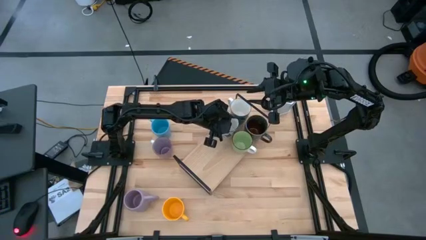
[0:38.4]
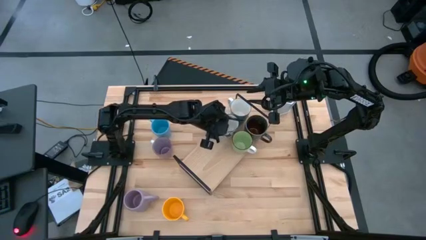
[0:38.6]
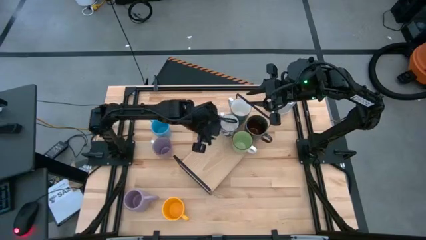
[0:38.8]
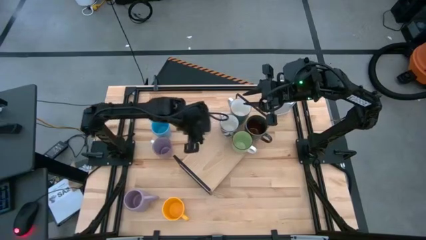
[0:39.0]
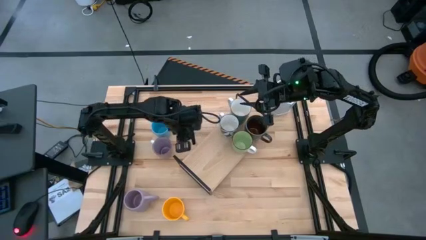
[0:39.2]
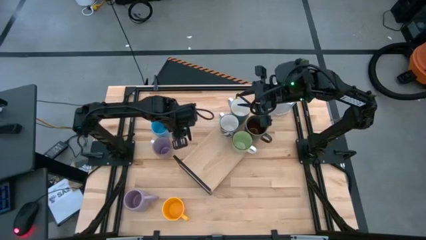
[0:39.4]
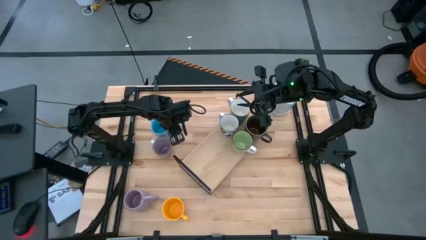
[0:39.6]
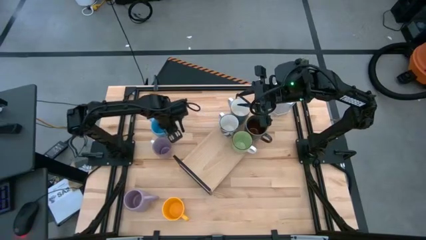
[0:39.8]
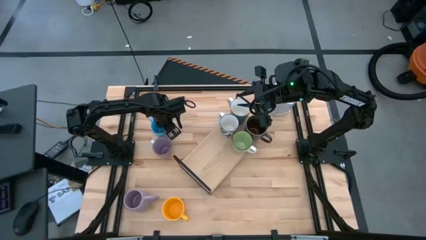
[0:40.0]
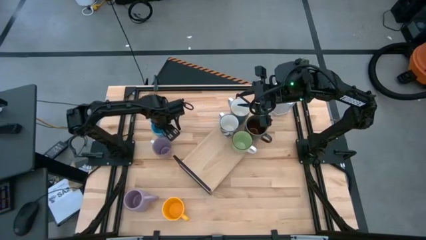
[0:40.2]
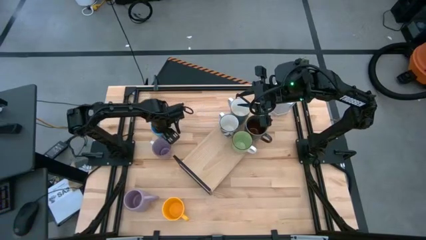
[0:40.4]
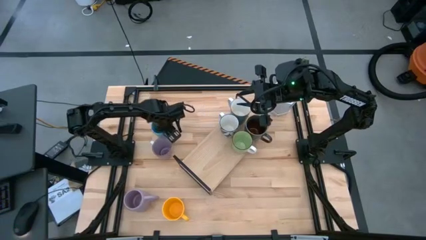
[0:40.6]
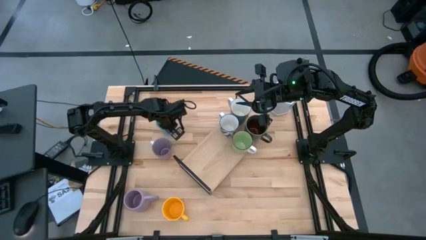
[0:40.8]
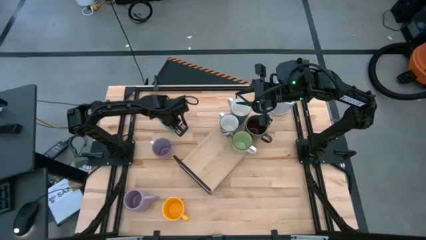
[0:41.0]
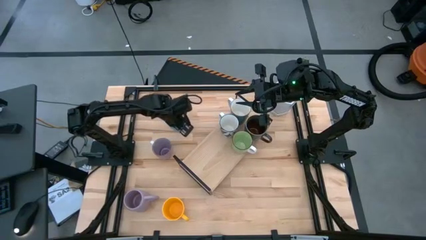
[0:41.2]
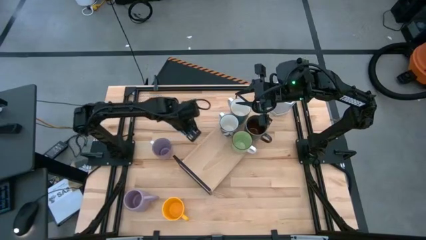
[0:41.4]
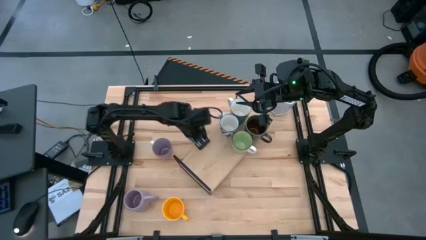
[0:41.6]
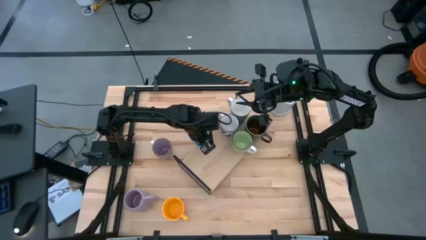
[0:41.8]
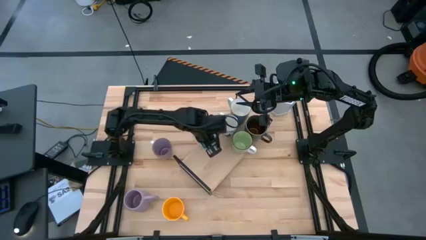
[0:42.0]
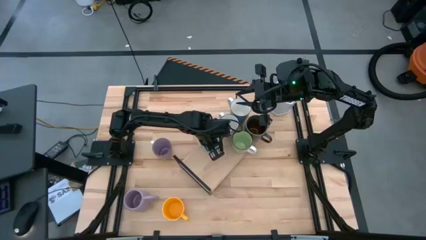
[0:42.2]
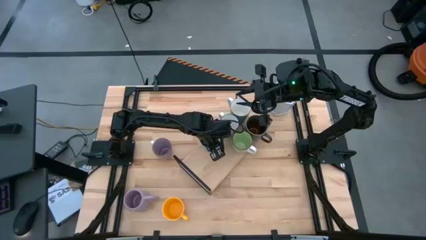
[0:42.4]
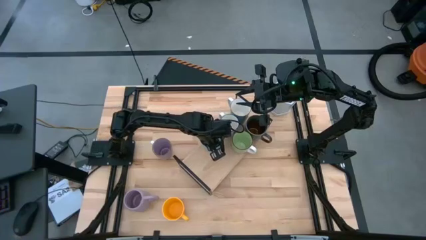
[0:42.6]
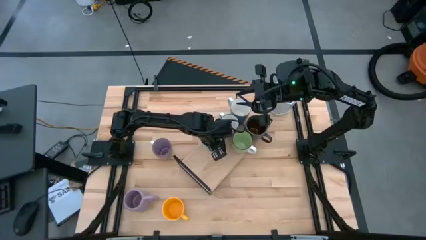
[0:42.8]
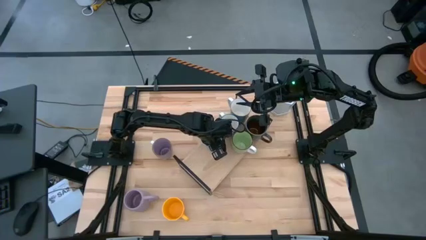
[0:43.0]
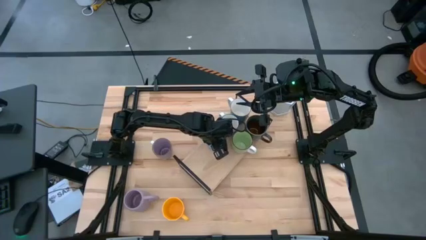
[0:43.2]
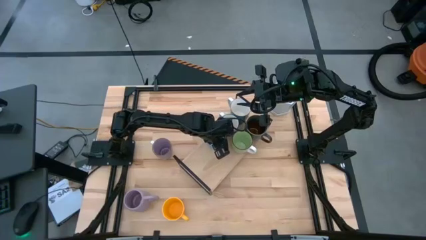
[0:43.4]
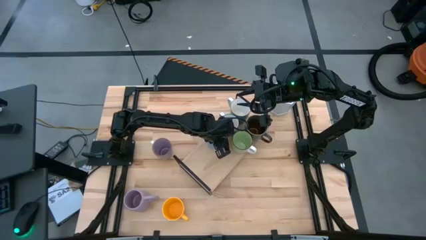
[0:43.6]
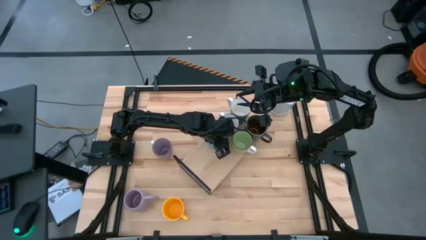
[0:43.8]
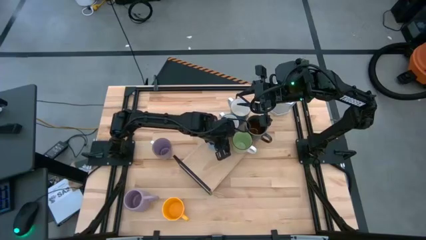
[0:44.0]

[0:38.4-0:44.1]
Task: Place coffee mugs
Put the blue mug on the shelf

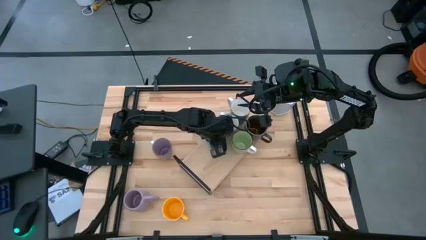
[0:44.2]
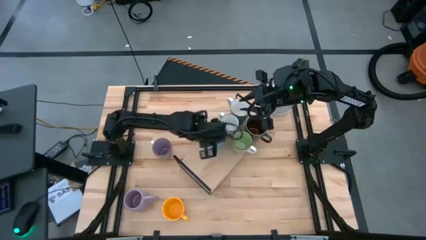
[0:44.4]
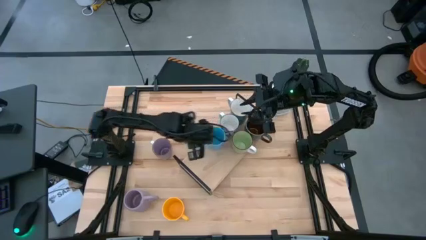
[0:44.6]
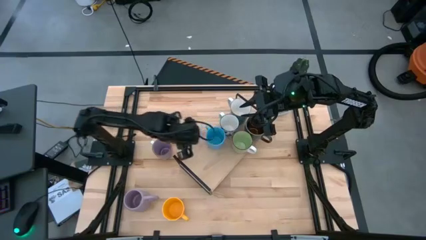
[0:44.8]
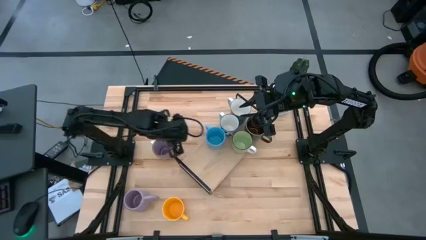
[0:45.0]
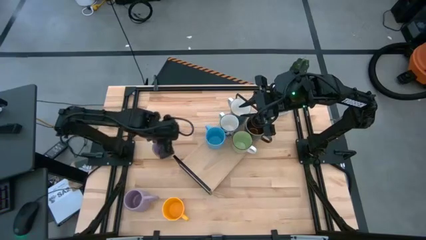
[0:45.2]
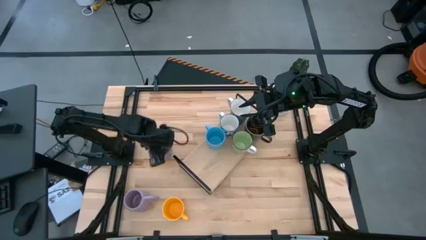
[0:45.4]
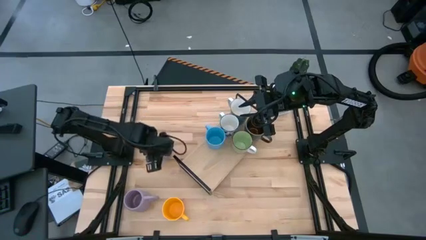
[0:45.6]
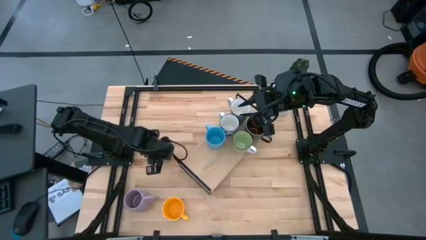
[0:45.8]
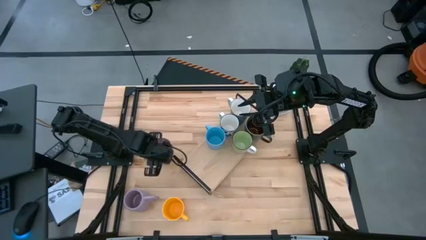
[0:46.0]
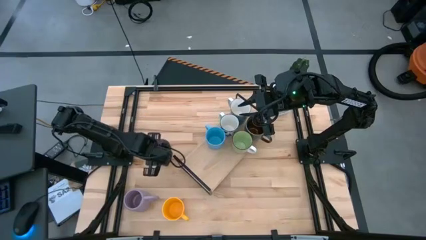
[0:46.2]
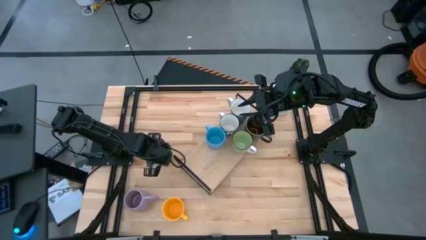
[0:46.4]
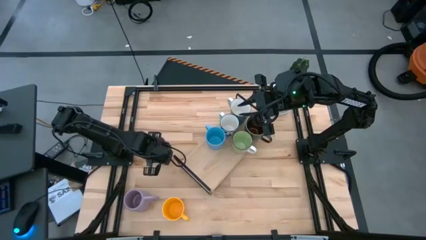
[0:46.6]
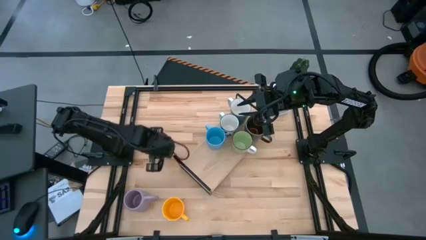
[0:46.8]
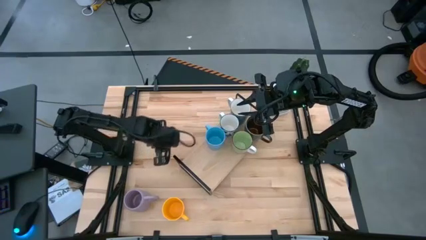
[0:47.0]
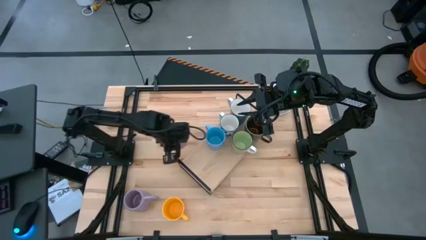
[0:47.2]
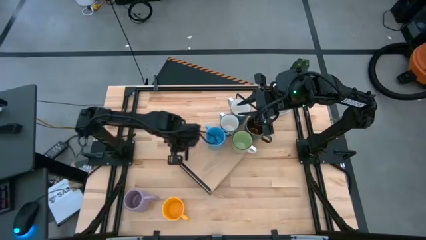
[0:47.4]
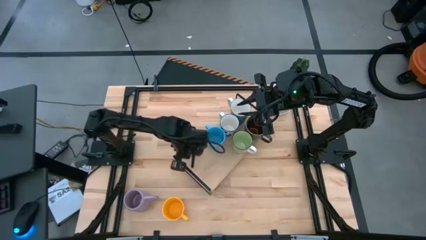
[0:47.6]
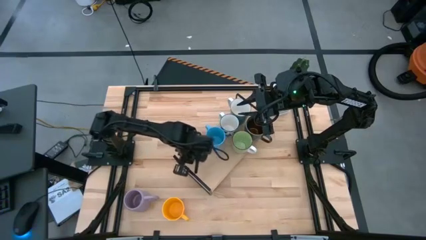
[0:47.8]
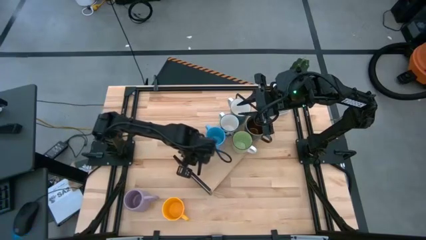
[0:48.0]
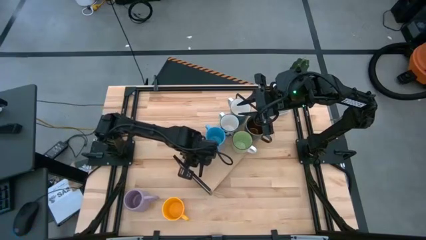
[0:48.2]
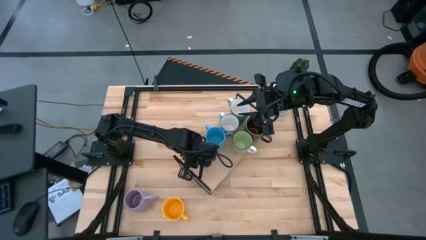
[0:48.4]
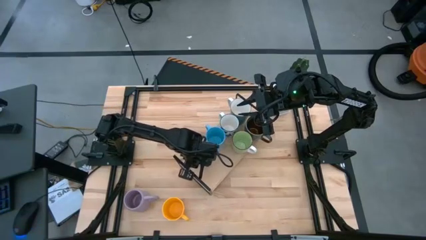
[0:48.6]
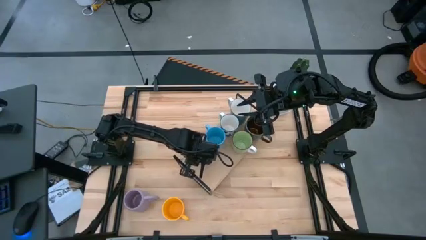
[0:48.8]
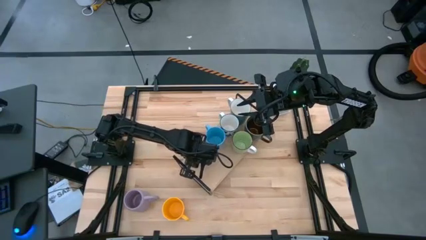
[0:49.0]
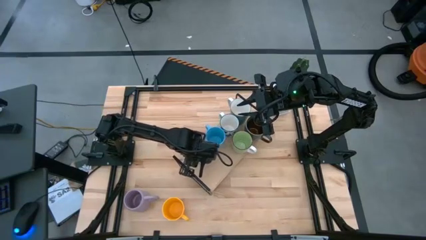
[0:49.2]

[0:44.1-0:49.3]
Put the top purple mug on the shelf

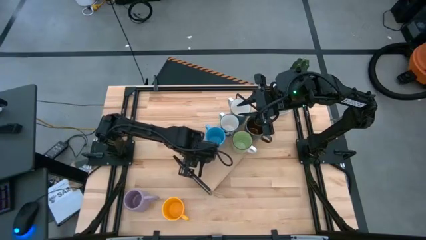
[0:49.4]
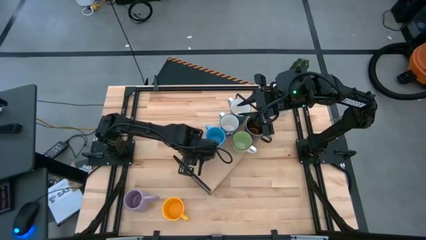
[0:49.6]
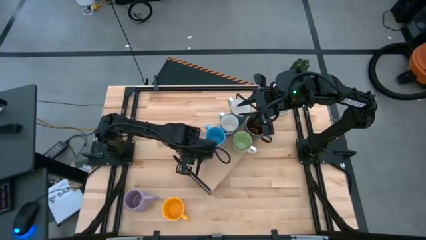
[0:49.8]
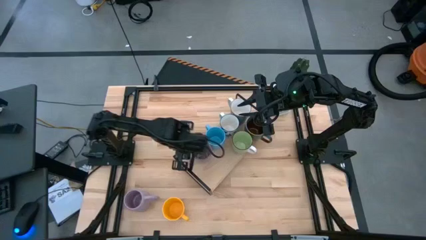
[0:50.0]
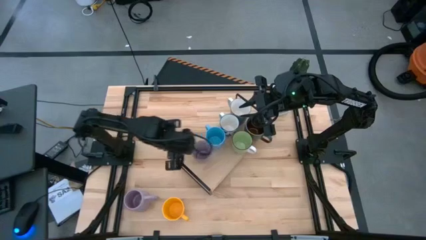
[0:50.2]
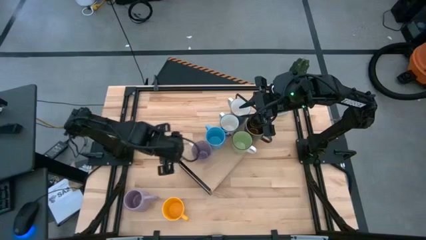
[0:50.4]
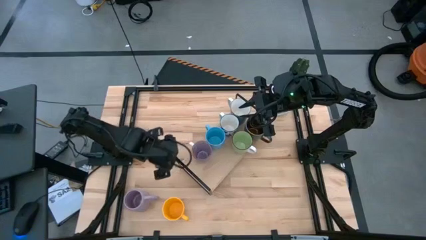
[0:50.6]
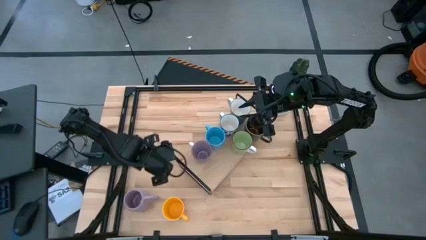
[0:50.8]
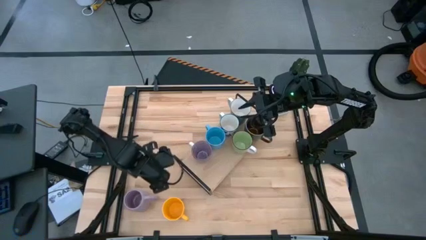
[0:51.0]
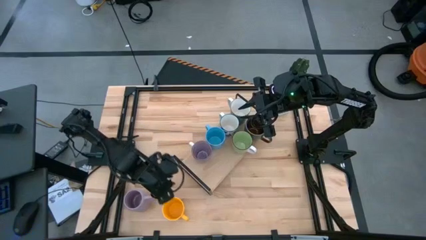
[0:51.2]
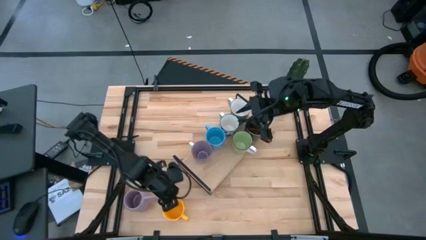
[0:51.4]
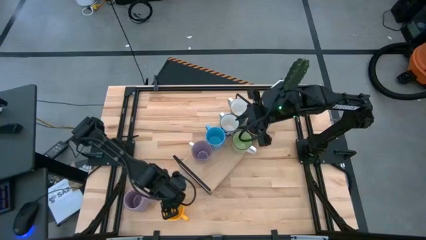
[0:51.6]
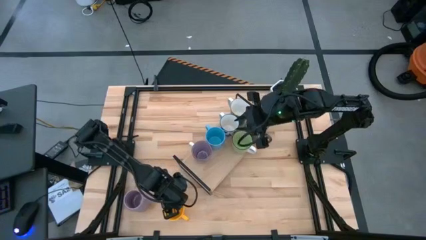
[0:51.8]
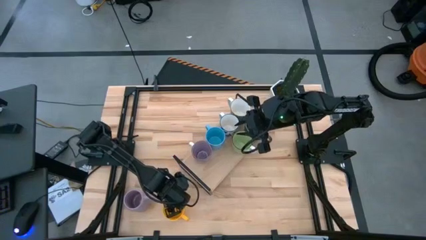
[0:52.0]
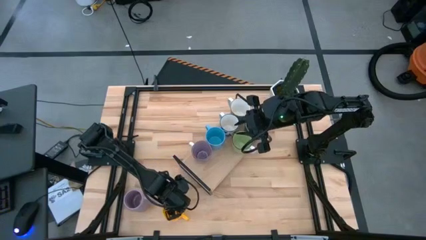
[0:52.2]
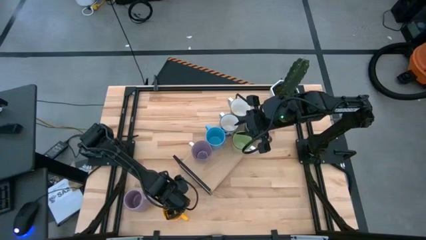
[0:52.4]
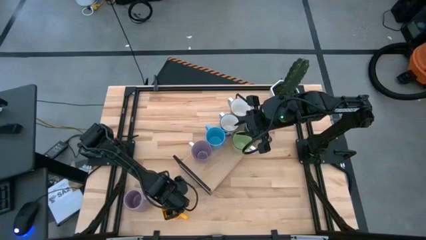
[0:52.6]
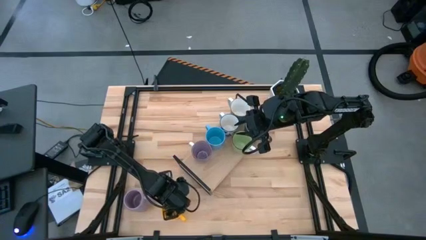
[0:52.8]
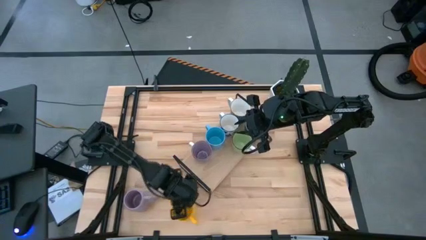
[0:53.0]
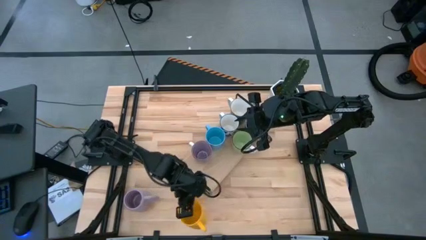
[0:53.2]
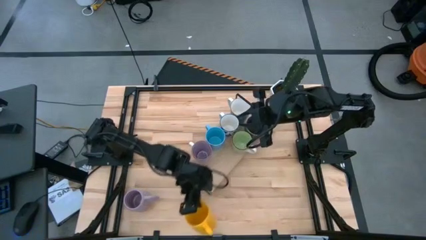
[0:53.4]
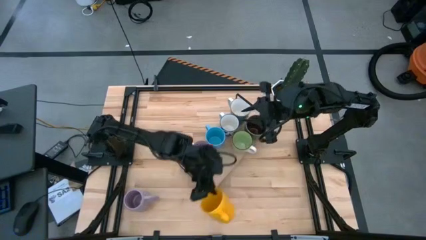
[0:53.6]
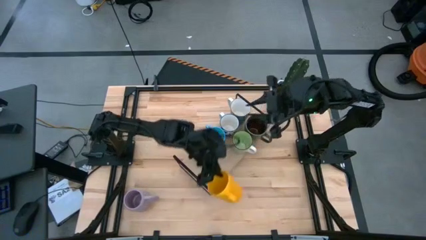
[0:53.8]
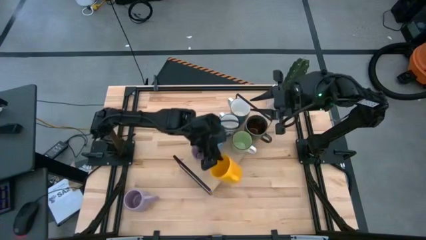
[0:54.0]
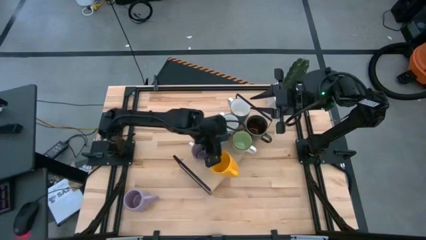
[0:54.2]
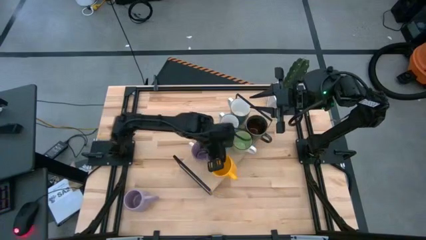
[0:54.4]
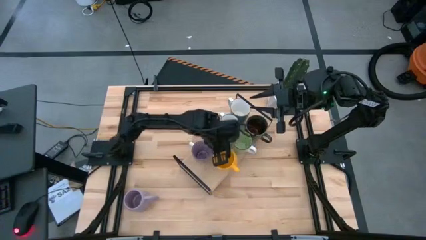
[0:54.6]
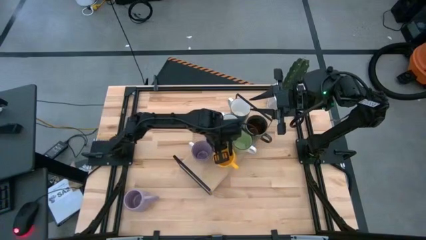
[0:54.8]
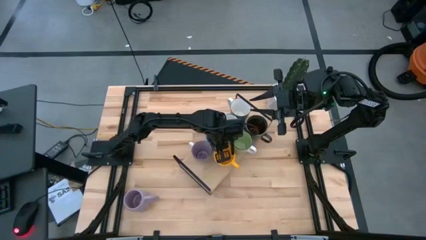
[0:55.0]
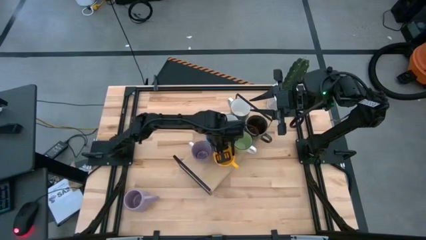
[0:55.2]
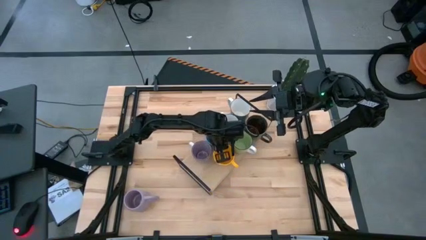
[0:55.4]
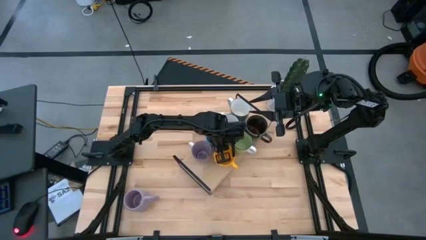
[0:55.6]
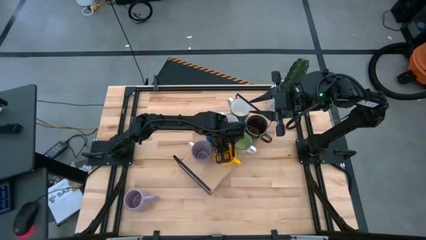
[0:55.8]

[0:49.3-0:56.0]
Put the yellow mug on the shelf
